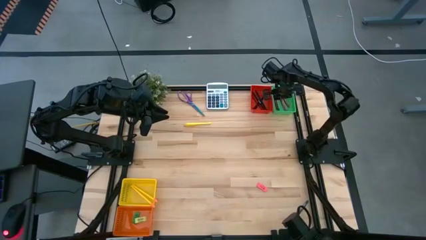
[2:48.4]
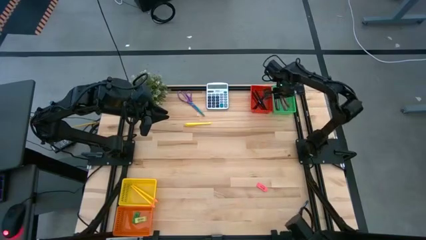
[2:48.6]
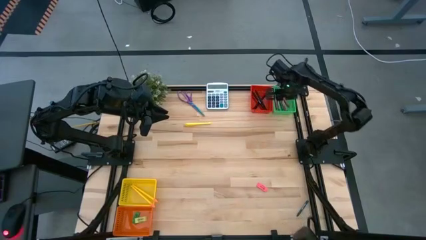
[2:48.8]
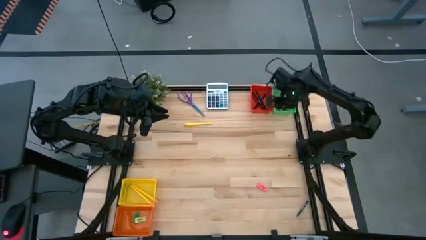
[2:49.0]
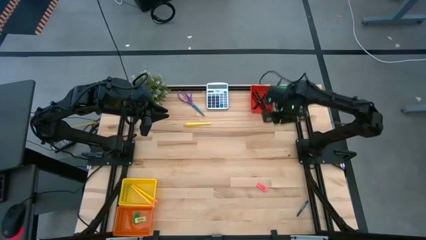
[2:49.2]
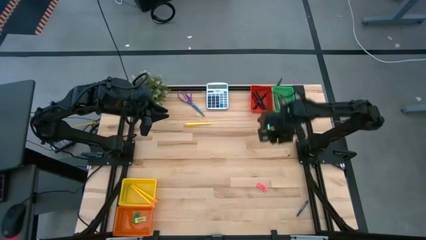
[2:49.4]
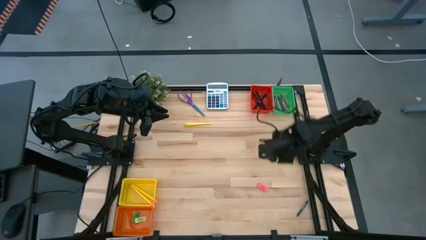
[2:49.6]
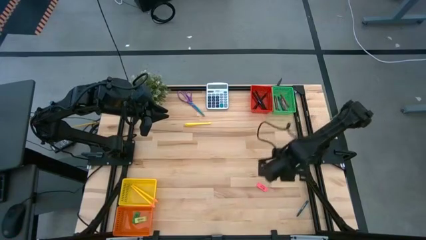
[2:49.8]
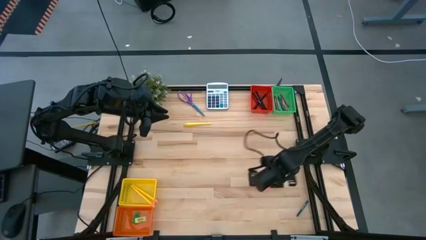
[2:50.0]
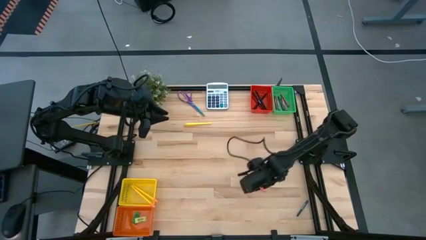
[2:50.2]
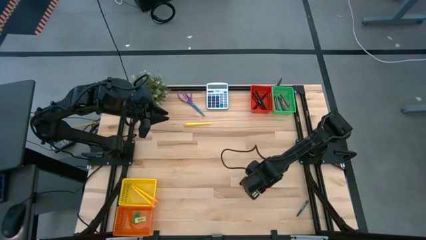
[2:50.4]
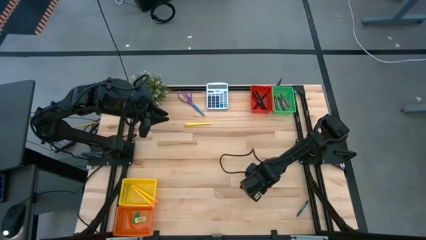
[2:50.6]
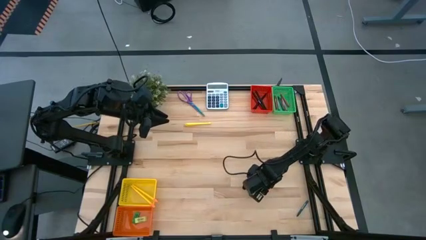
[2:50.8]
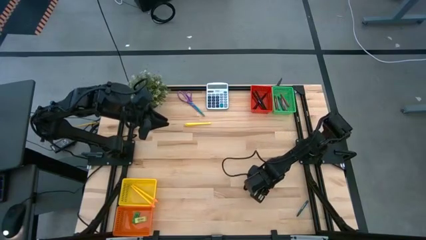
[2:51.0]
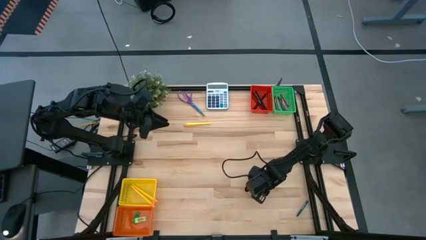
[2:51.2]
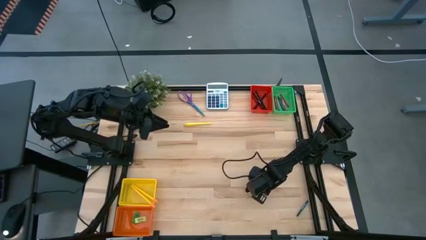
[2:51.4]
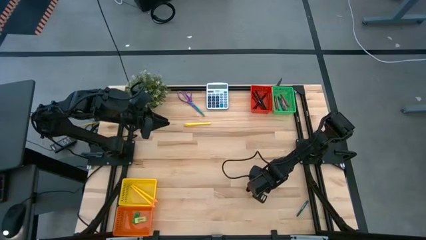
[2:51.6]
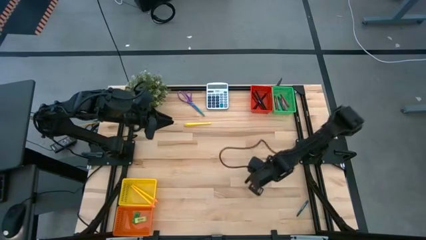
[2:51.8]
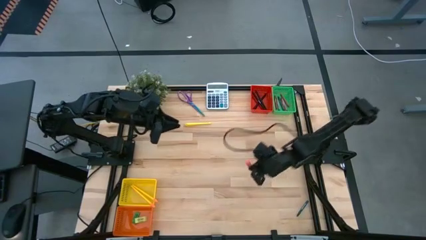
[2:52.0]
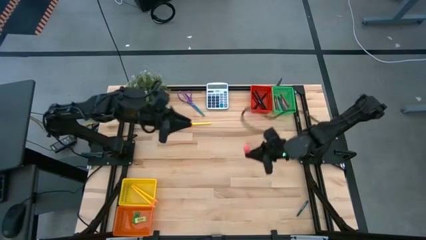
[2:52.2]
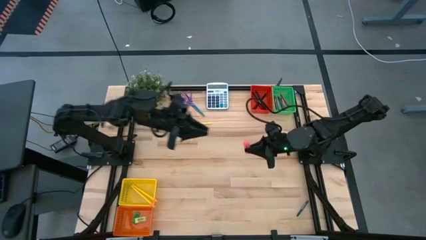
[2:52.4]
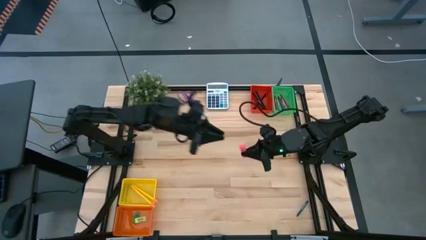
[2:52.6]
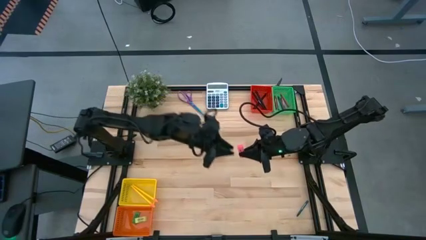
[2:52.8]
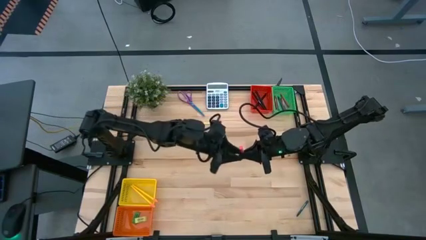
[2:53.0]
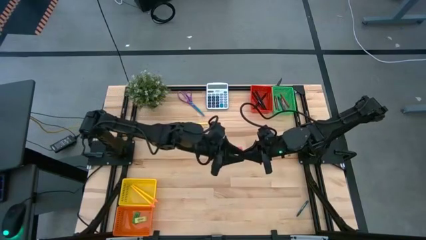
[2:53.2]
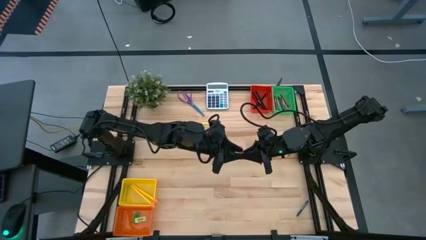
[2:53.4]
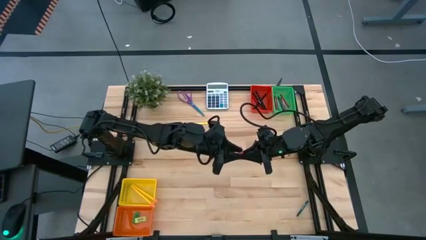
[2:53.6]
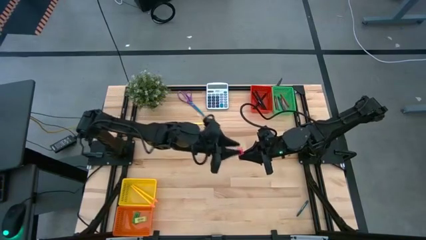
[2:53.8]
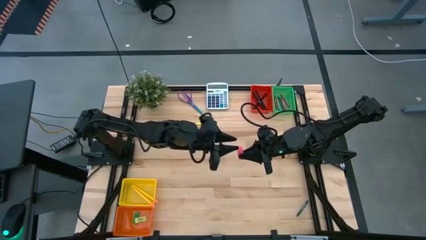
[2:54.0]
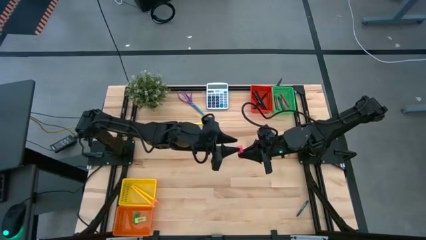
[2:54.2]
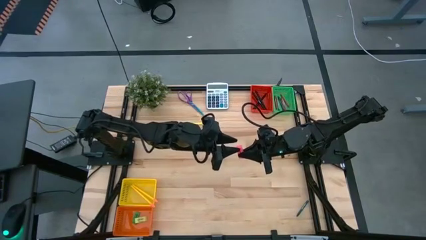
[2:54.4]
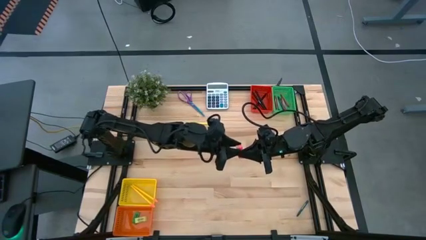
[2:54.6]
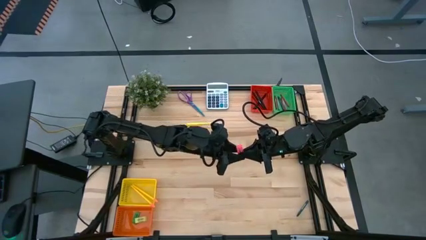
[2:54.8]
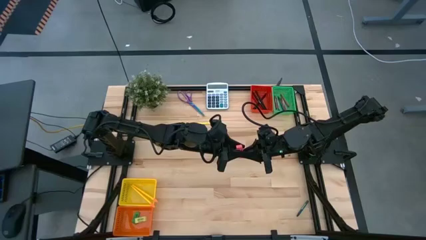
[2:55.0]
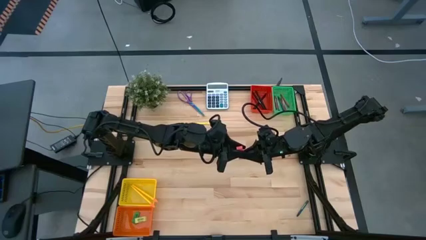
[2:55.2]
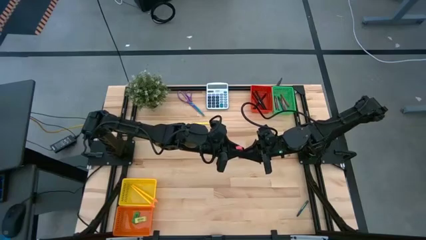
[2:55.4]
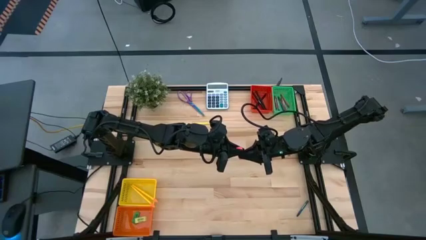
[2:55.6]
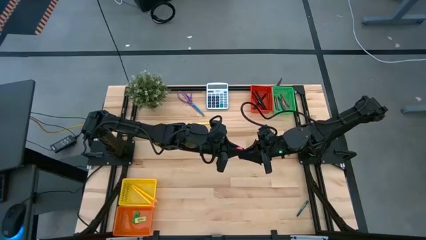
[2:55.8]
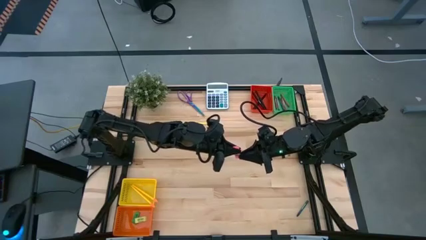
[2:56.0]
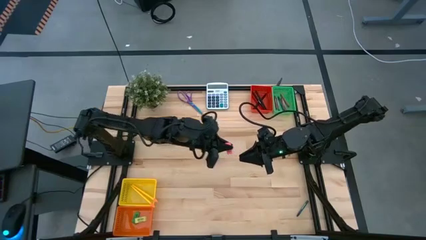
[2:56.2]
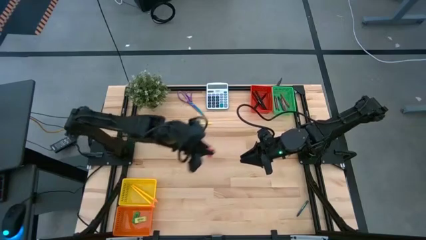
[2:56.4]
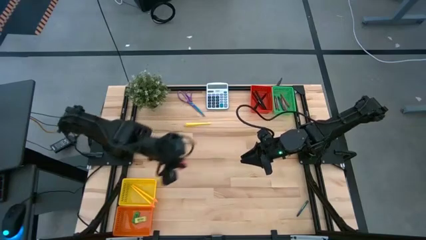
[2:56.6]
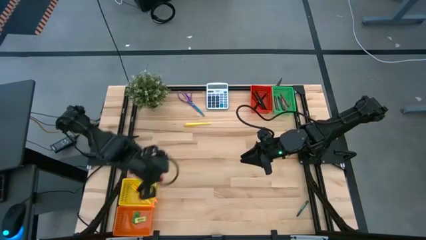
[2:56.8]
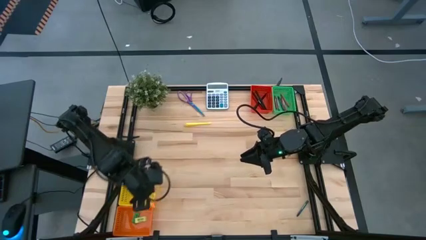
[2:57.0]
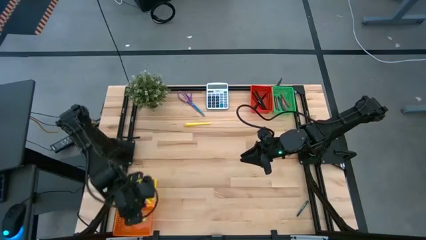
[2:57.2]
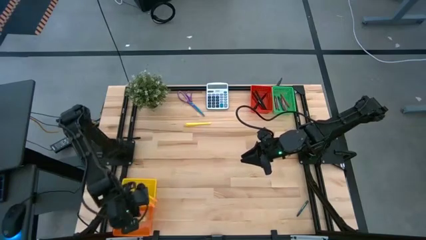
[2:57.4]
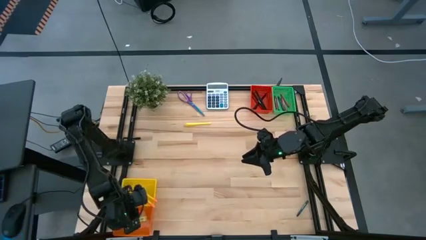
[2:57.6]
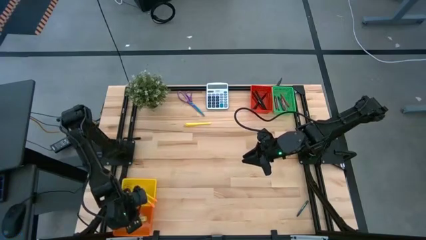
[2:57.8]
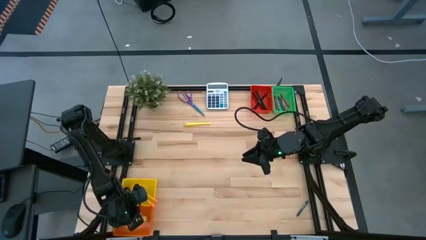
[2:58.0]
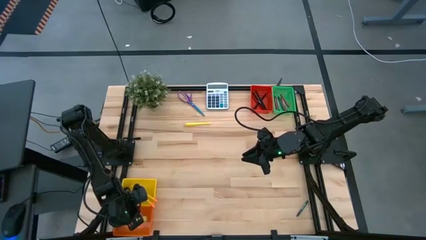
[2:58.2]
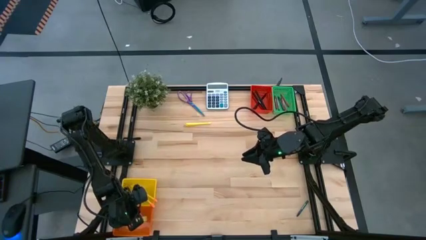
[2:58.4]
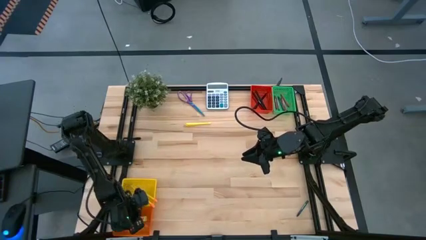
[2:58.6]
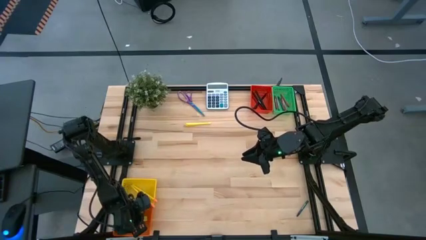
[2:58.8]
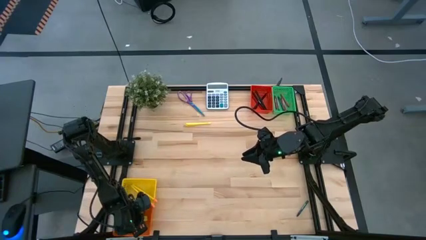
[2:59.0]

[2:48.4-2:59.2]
Task: Sort crayons/erasers/pens/pencils in bins
Put the pink eraser into the orange bin

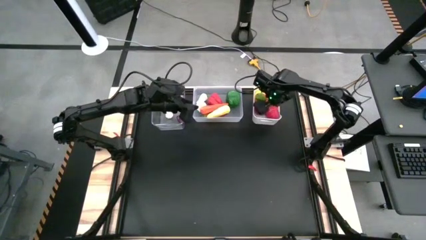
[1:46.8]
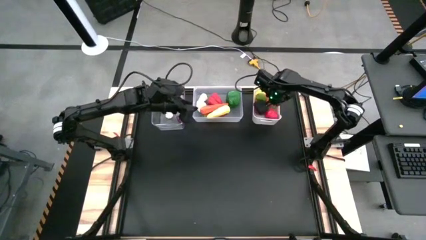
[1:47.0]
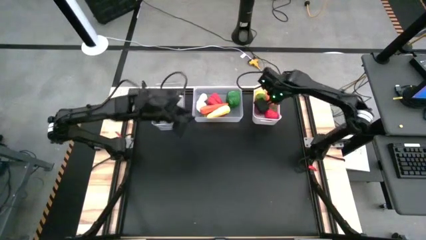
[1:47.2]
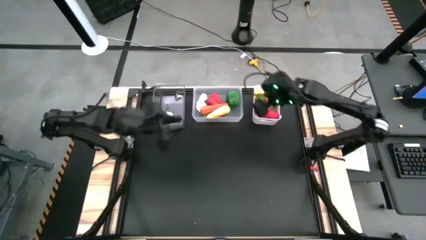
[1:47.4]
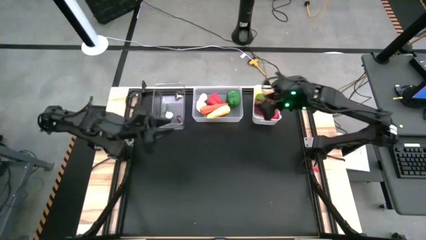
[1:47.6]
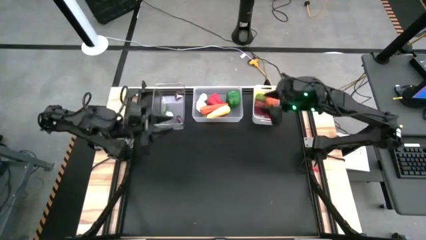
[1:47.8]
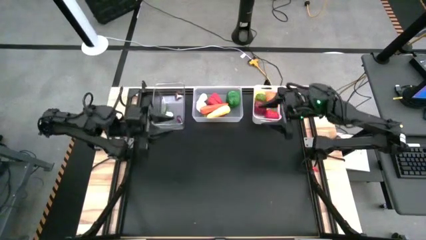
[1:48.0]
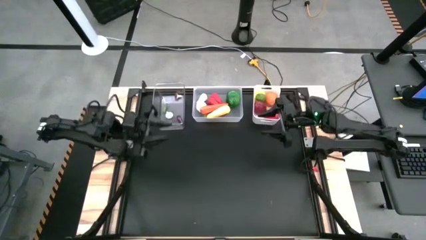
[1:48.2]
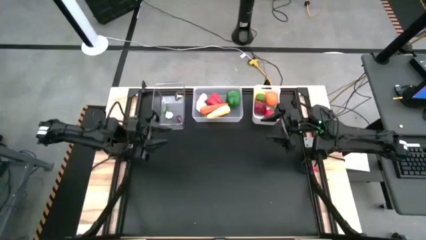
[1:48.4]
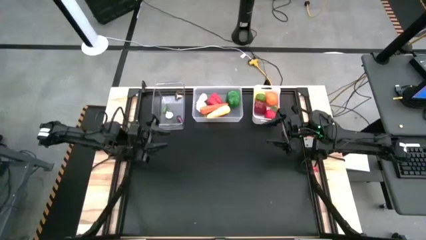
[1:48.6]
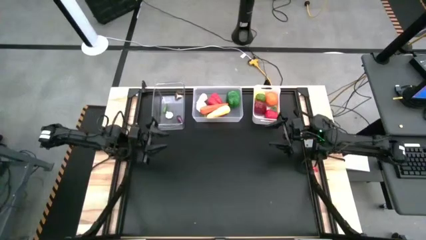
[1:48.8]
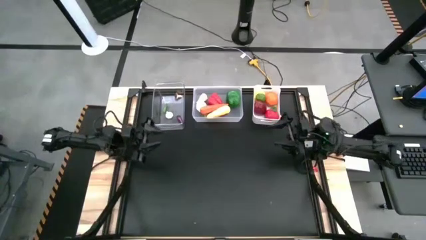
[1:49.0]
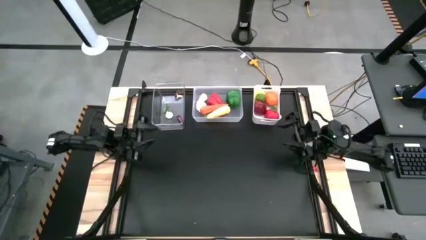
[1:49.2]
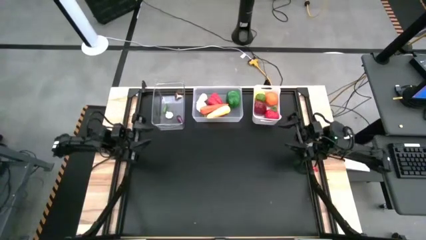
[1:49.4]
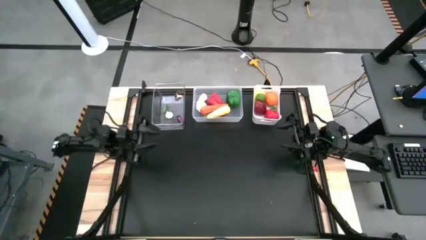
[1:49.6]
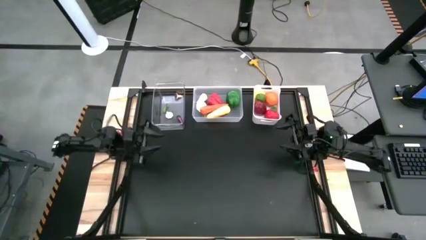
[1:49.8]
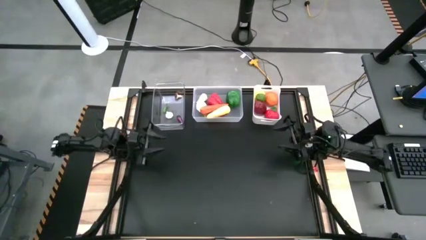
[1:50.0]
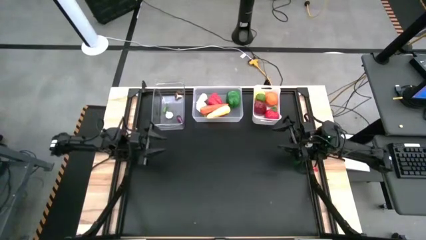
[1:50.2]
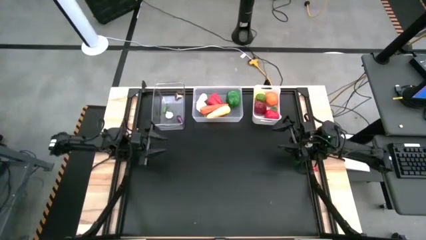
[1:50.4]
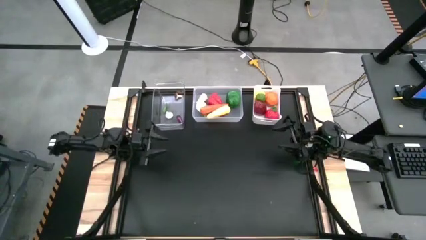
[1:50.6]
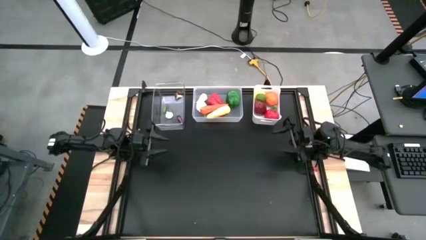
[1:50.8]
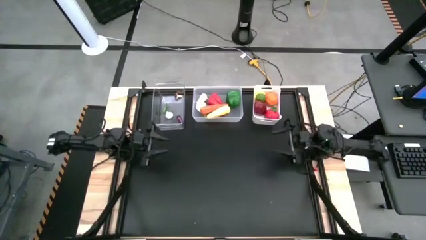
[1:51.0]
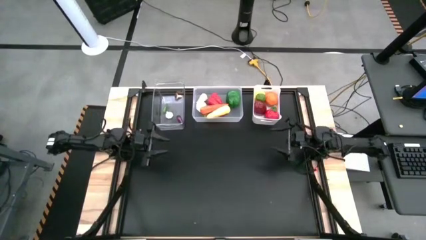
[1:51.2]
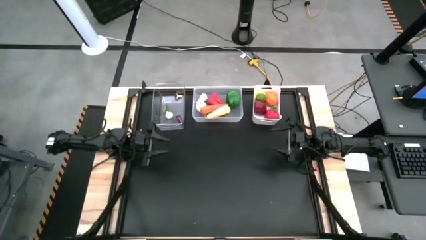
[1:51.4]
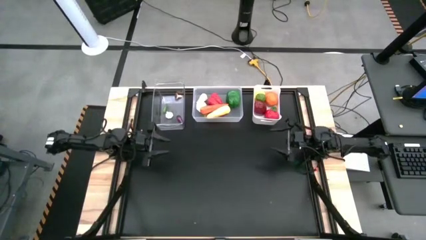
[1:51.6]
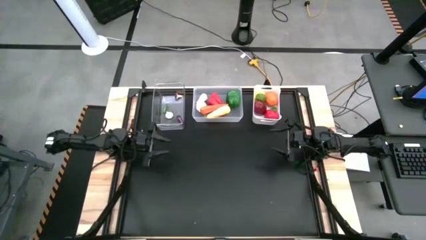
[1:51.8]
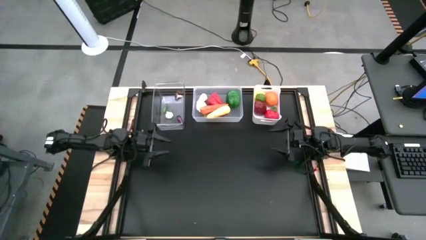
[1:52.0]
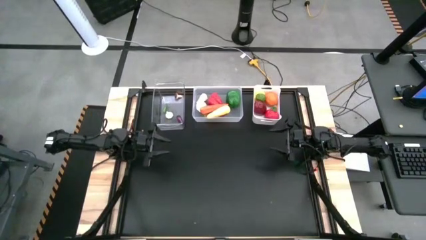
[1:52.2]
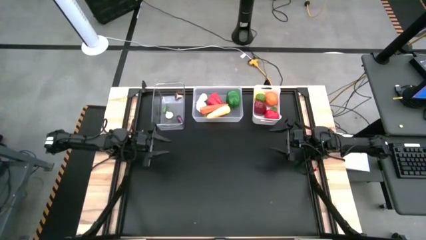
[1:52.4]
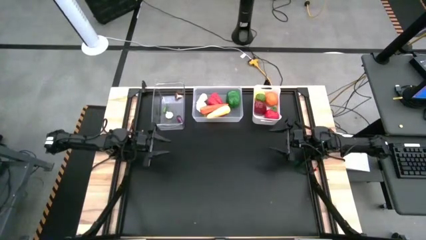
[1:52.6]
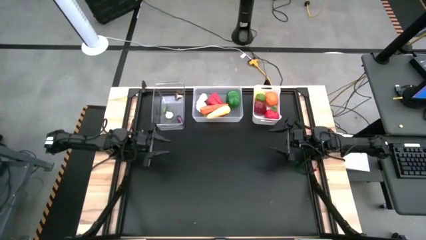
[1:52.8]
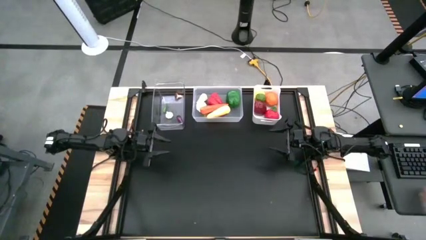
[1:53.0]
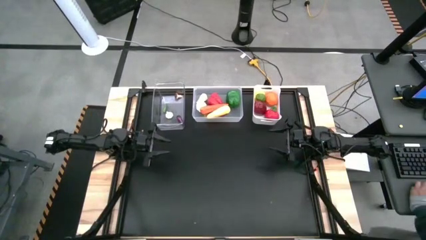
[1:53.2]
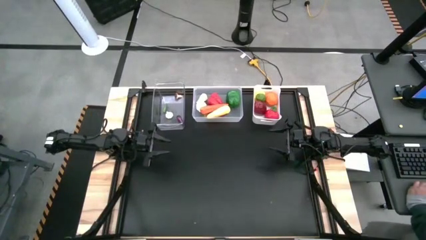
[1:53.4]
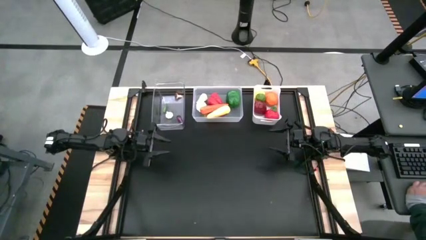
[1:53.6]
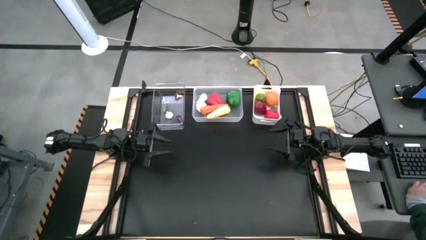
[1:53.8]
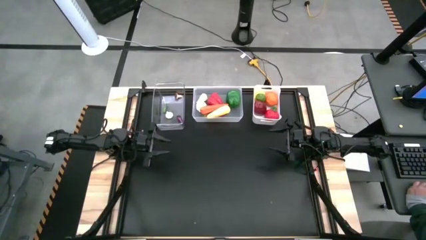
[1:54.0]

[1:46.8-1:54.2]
Task: Sort produce into baskets
Return to Home Position
